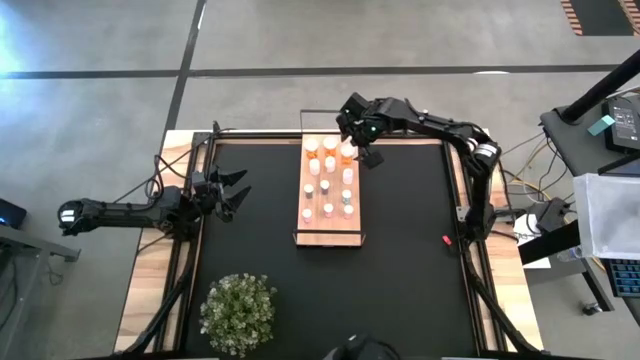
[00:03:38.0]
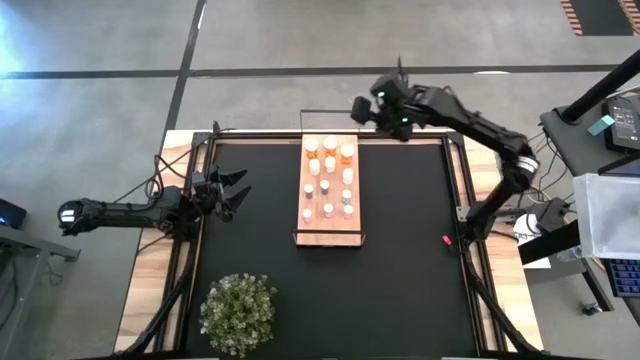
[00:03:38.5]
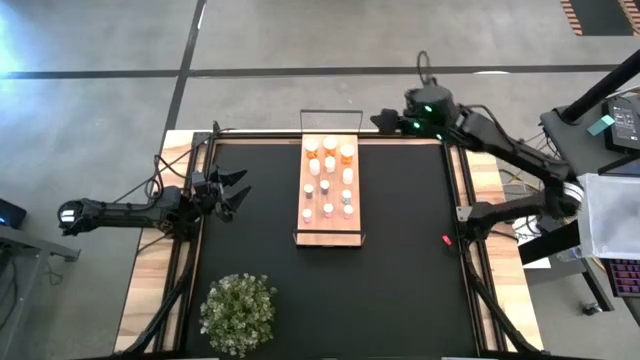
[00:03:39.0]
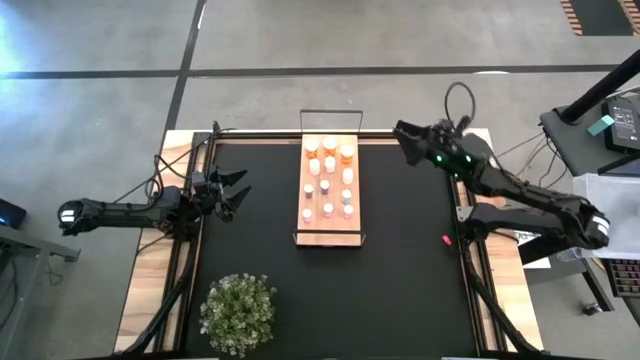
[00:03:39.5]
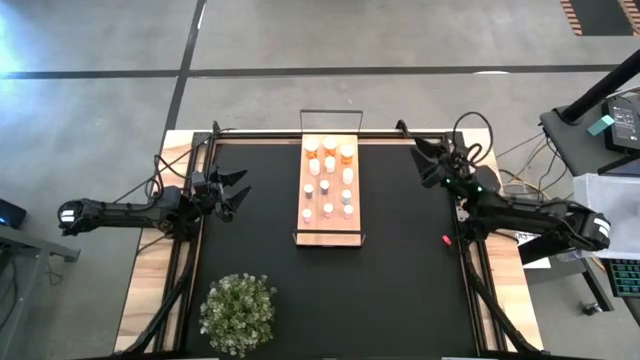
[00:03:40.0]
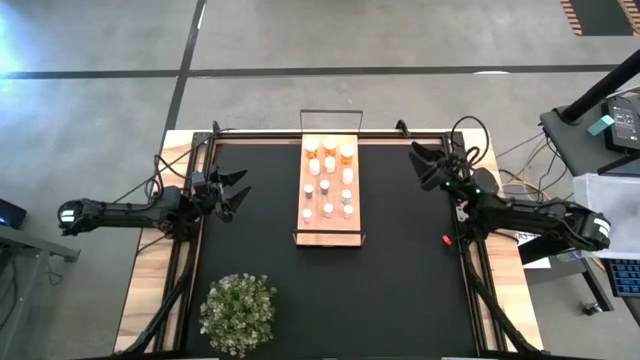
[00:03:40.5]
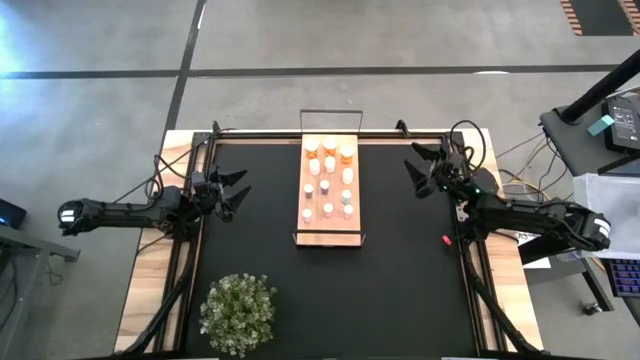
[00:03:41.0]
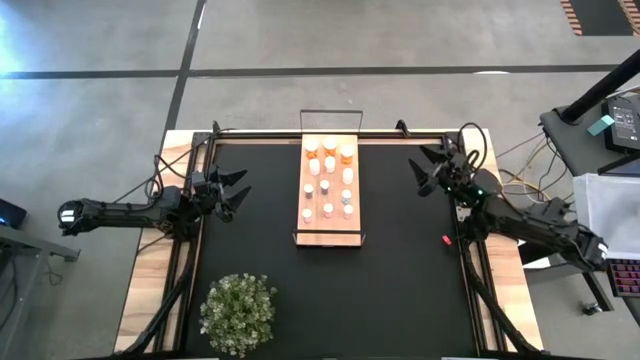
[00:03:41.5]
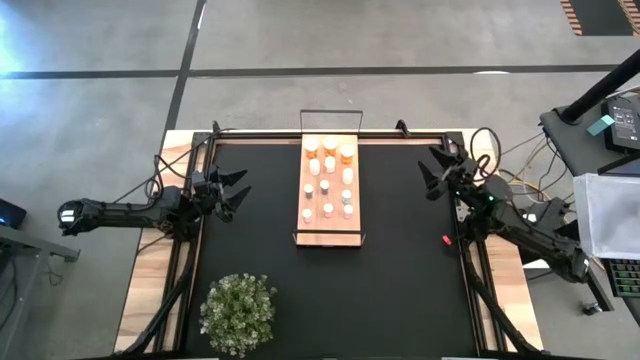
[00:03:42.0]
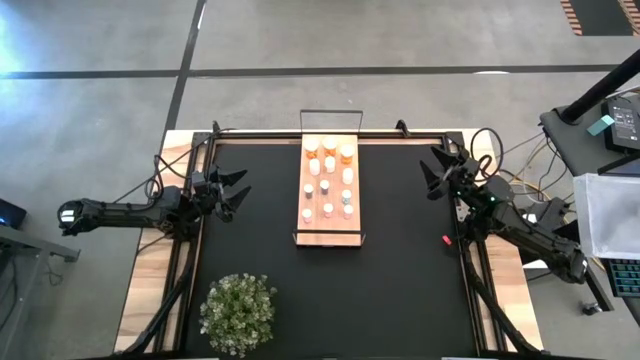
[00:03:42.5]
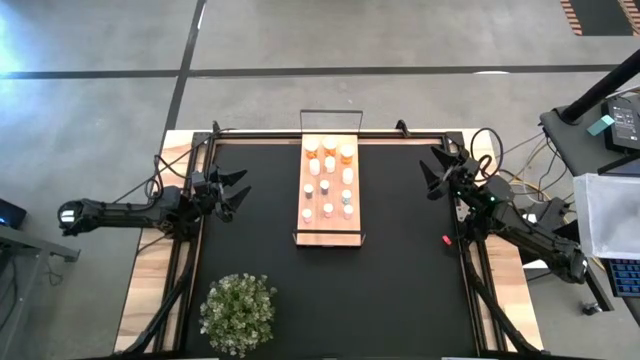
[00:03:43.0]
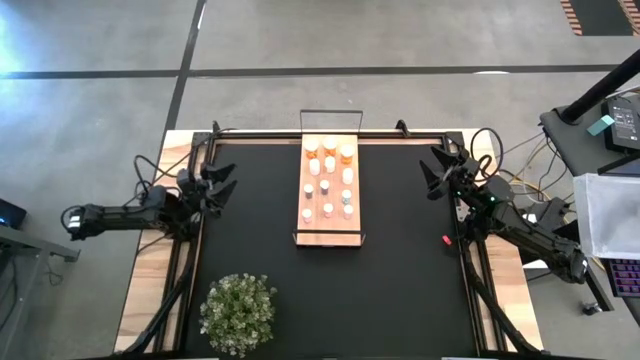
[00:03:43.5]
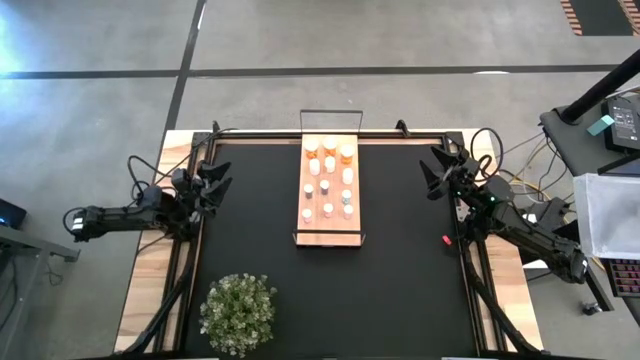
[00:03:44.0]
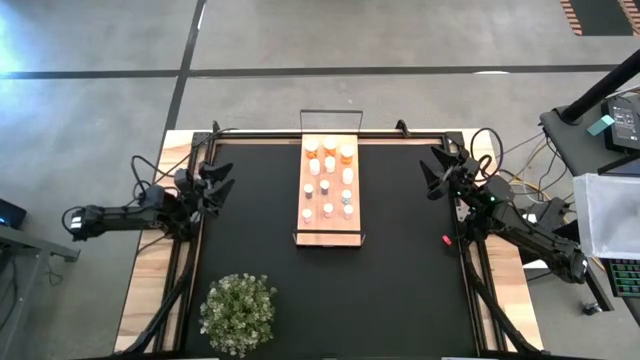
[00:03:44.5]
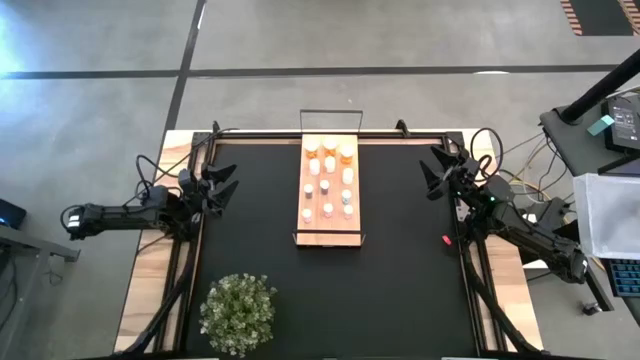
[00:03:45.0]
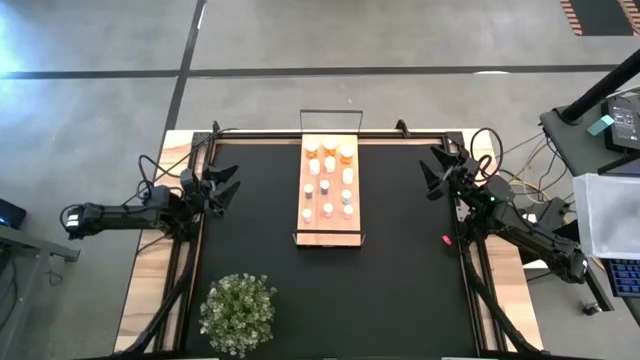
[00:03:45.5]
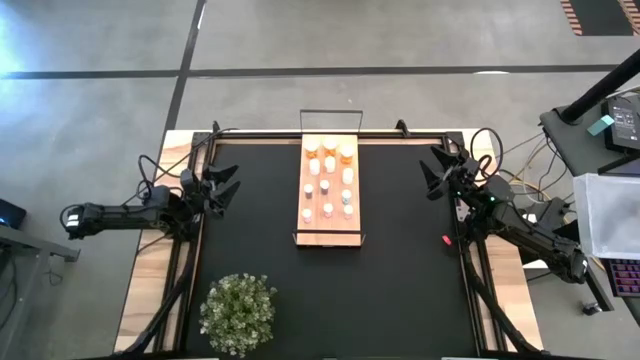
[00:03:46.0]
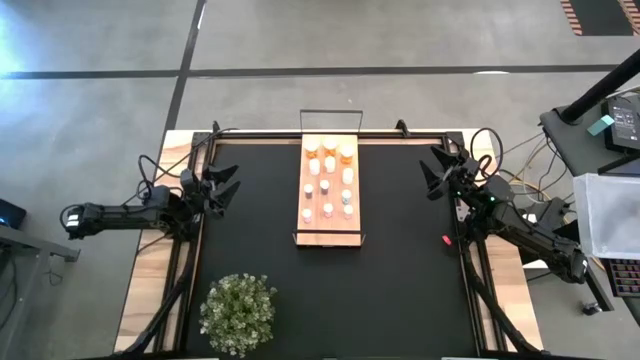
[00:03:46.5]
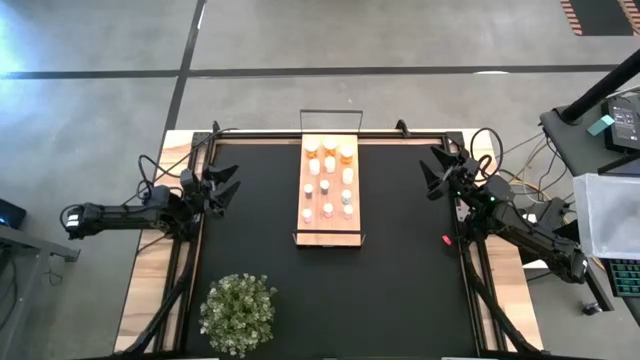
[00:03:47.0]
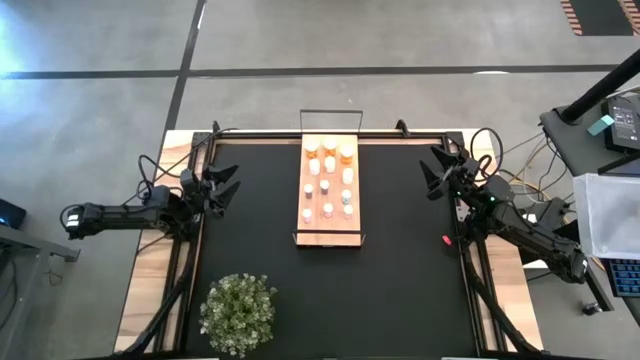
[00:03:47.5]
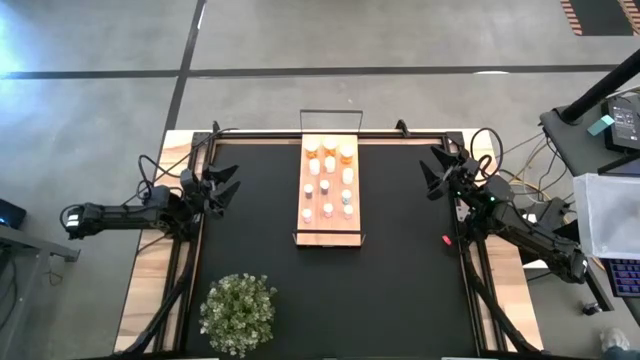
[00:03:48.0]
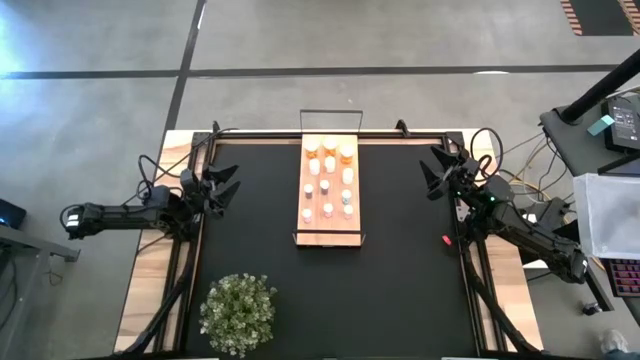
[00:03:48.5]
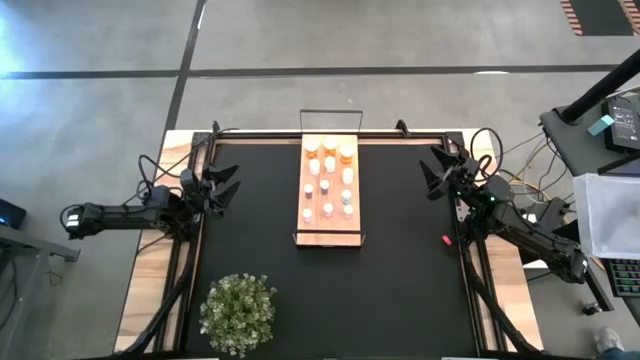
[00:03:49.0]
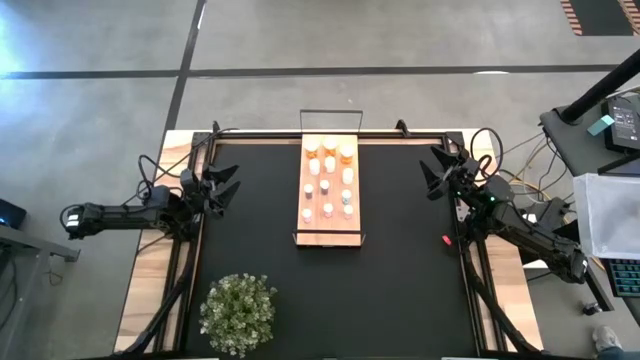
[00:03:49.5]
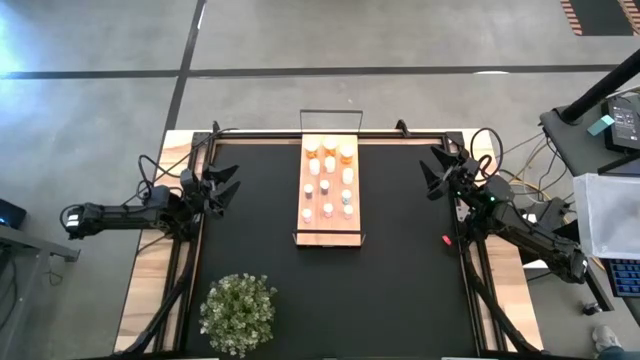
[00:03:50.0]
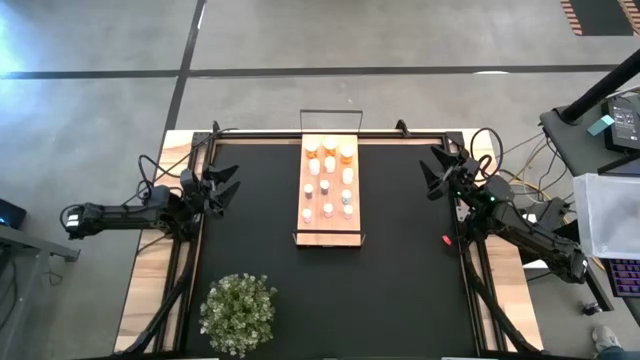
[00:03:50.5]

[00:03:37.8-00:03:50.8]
Task: Pick and place medicine bottles onto shelf by color
Return to Home Position

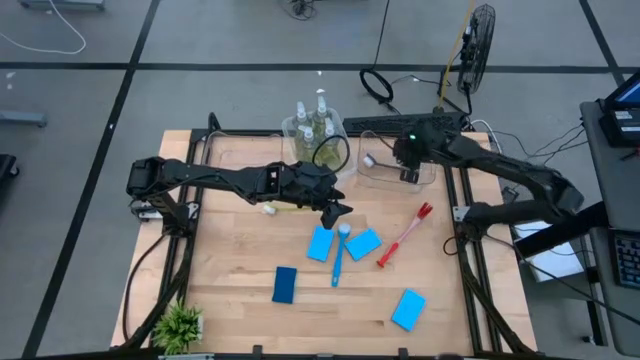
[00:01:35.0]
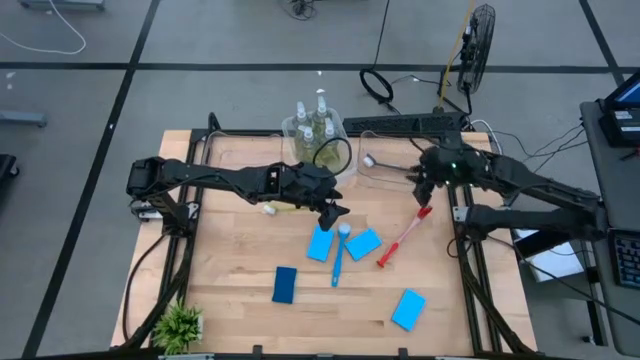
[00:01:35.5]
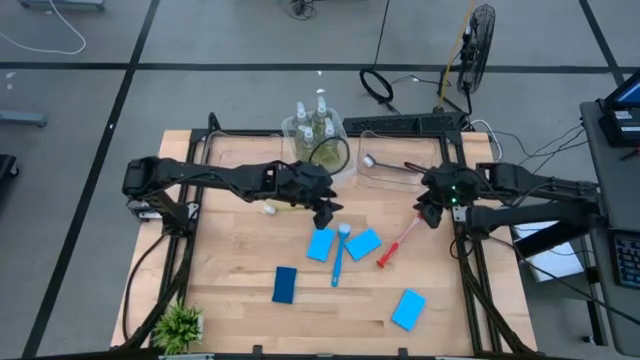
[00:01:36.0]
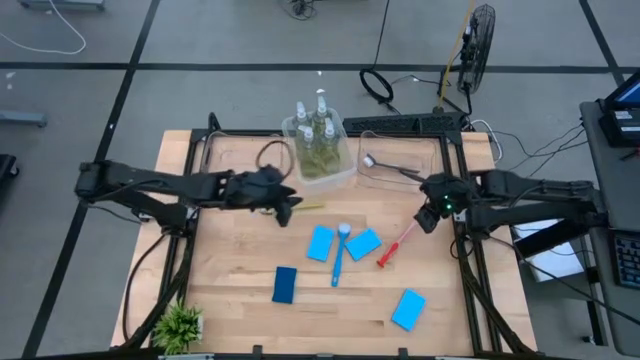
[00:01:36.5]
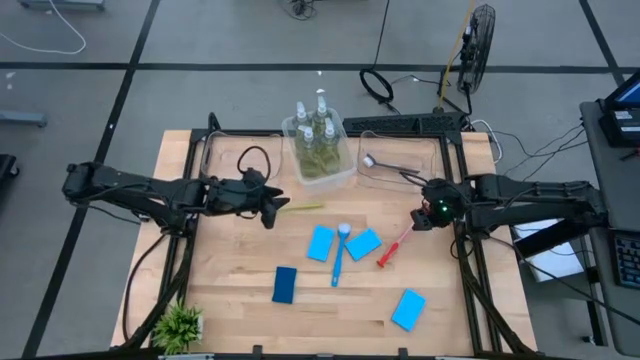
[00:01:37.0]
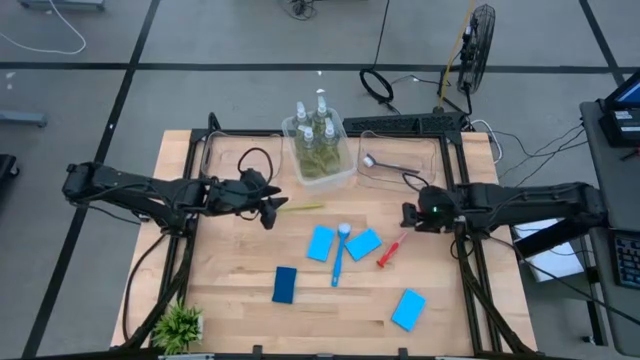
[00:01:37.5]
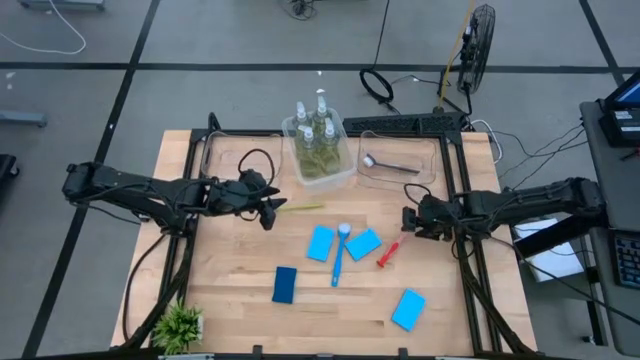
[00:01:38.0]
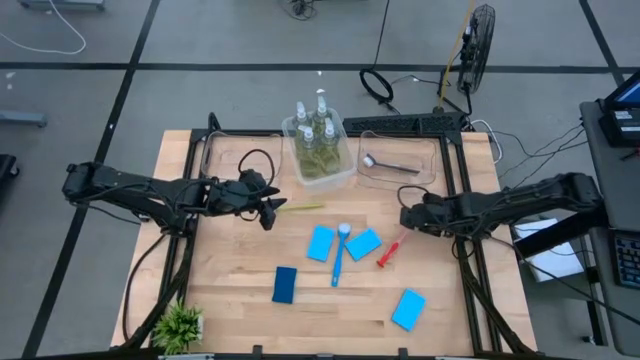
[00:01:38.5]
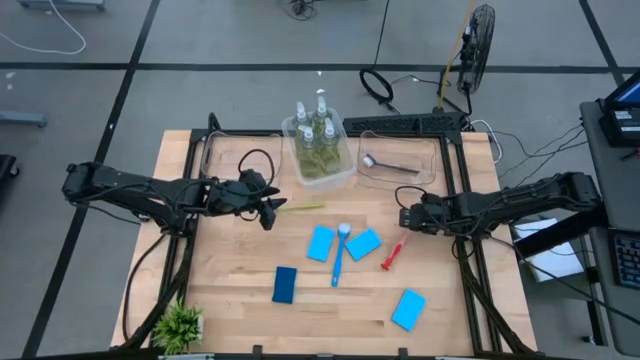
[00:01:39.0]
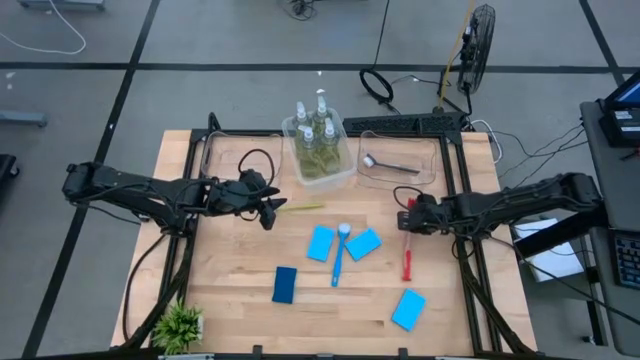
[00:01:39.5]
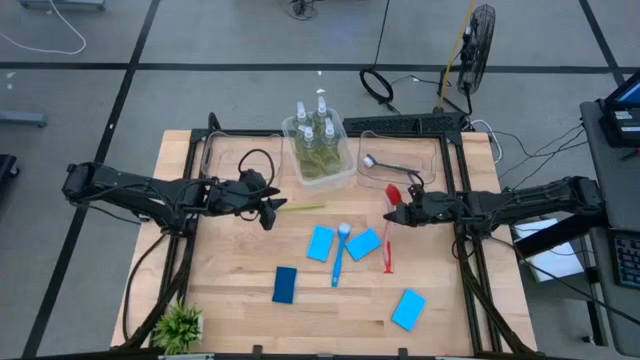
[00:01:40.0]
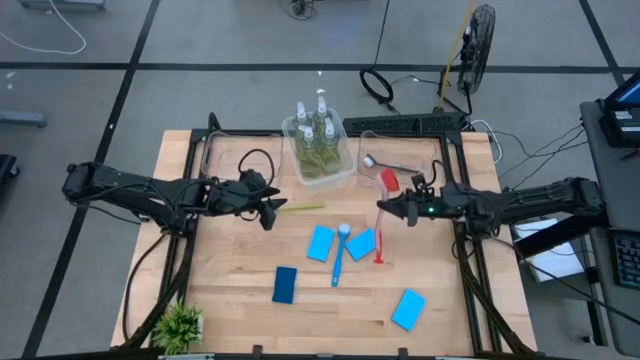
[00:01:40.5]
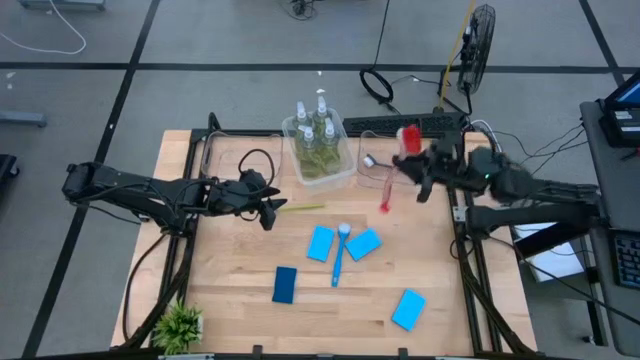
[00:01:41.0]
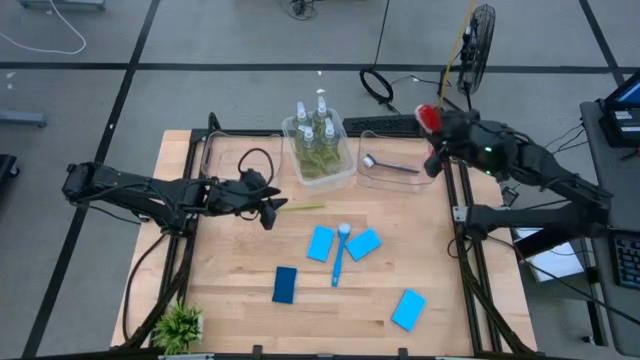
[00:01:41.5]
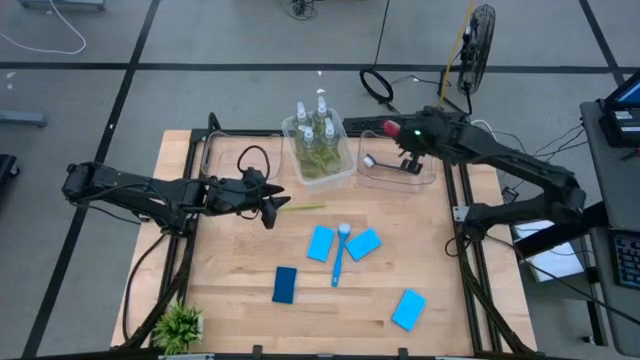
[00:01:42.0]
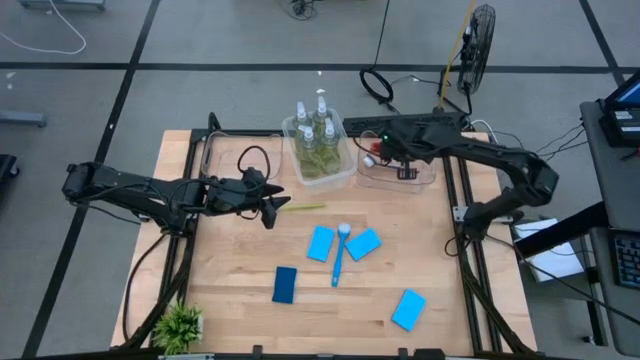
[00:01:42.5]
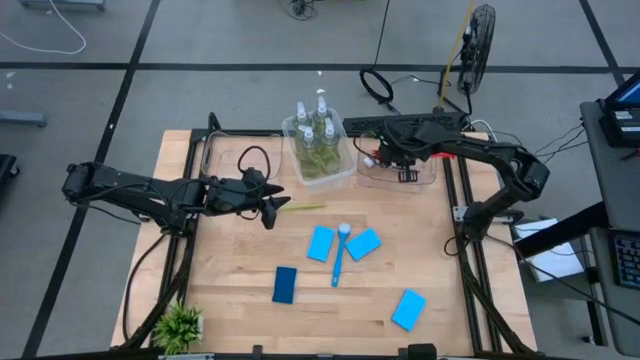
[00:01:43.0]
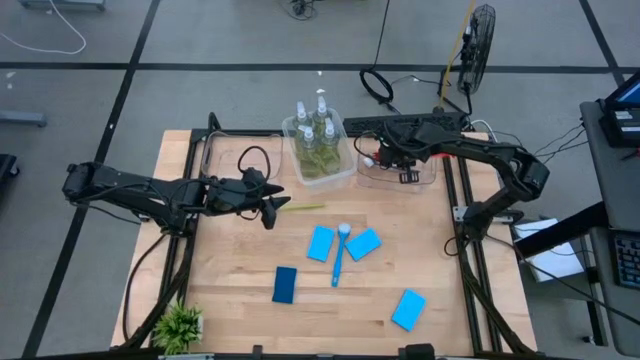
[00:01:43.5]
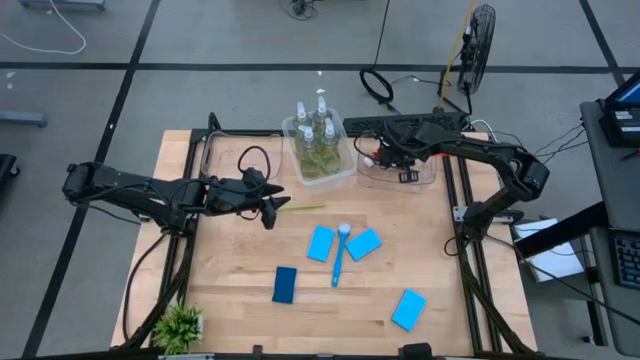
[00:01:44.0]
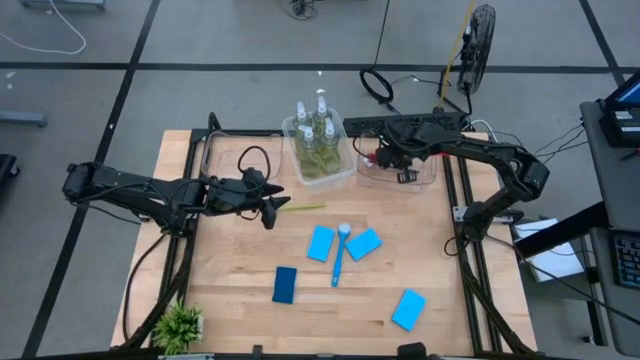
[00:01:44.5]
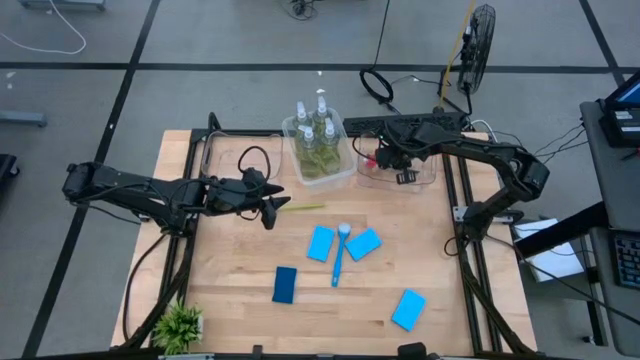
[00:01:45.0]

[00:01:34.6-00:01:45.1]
Task: Pick & Place Kitchen Sink Supplies
Put the red dish brush into the right transparent bin
